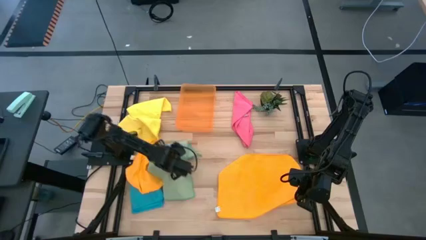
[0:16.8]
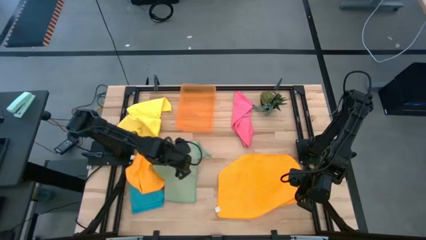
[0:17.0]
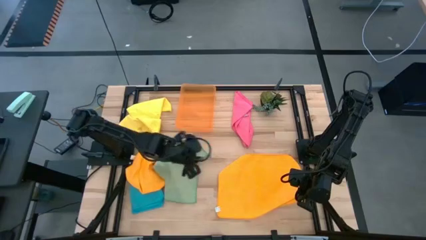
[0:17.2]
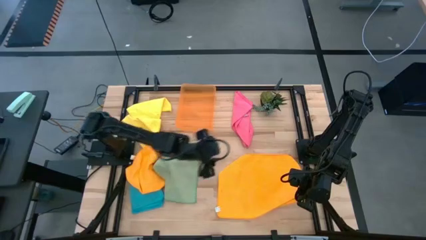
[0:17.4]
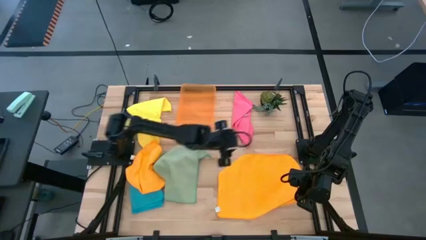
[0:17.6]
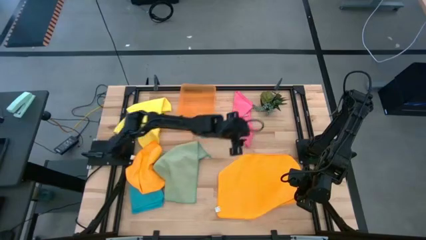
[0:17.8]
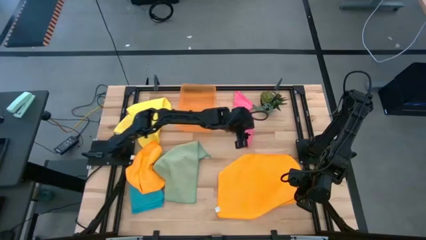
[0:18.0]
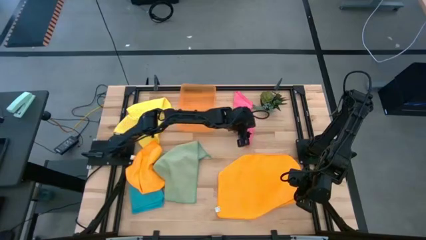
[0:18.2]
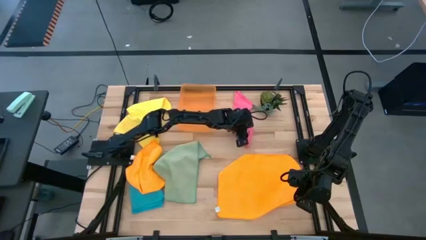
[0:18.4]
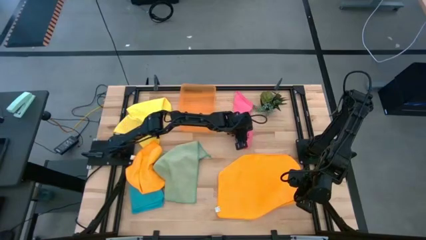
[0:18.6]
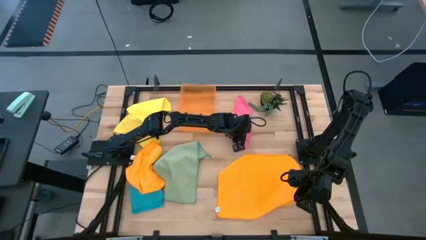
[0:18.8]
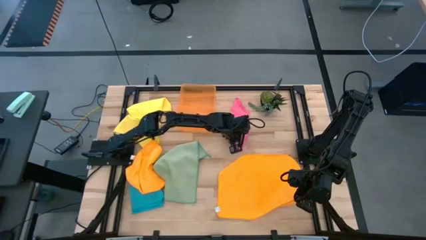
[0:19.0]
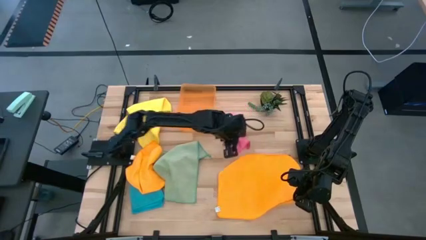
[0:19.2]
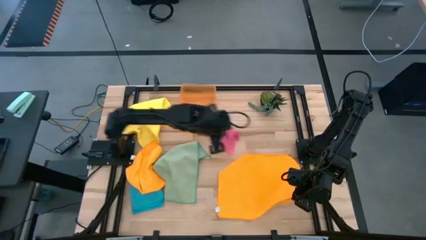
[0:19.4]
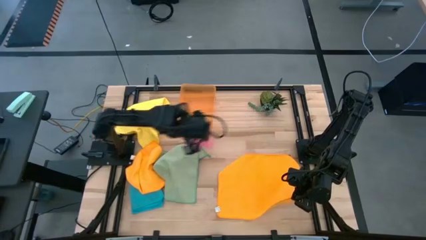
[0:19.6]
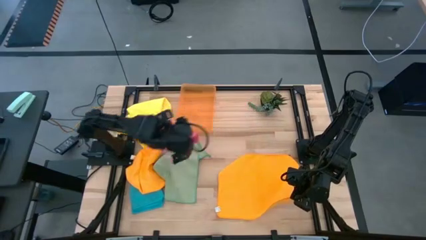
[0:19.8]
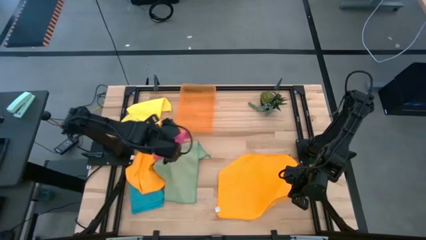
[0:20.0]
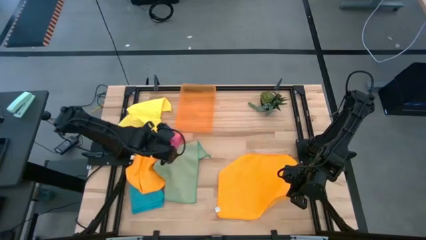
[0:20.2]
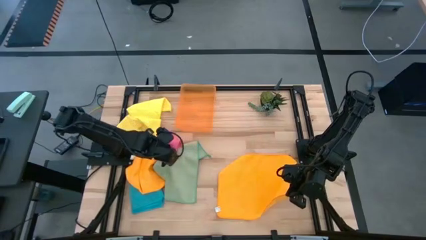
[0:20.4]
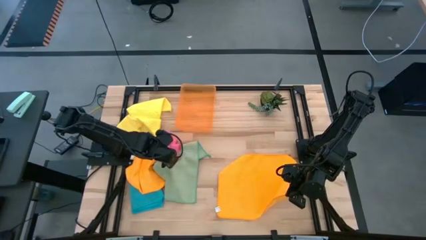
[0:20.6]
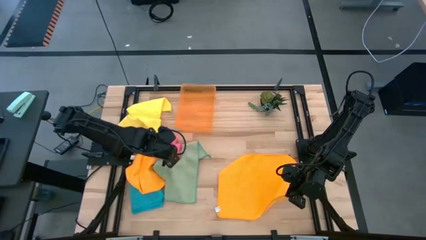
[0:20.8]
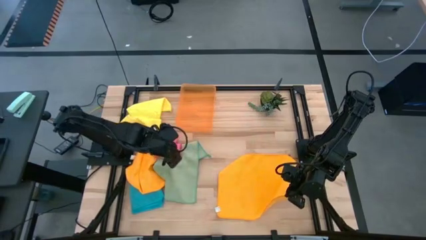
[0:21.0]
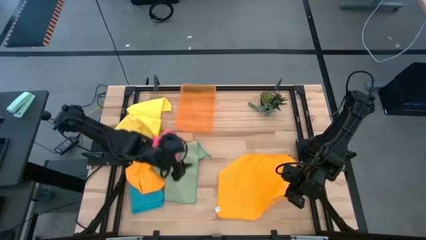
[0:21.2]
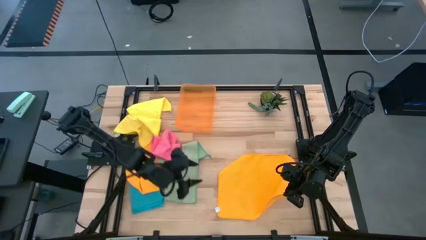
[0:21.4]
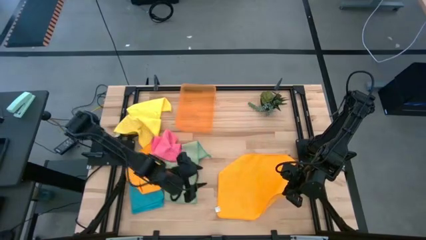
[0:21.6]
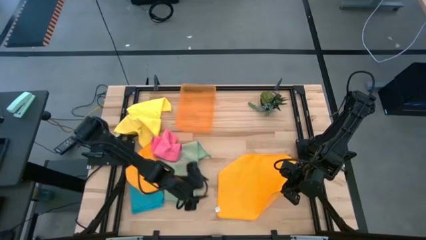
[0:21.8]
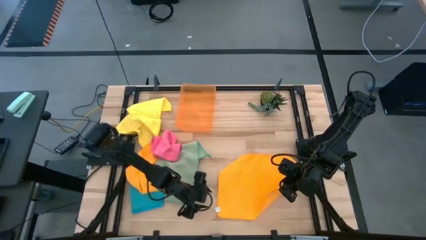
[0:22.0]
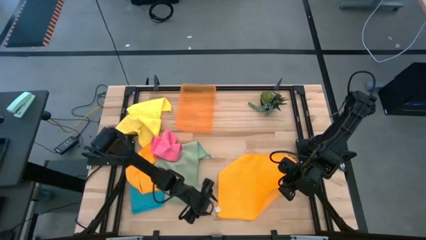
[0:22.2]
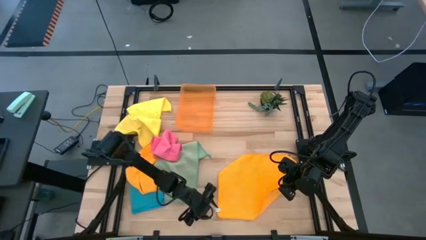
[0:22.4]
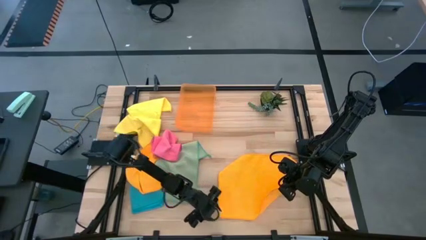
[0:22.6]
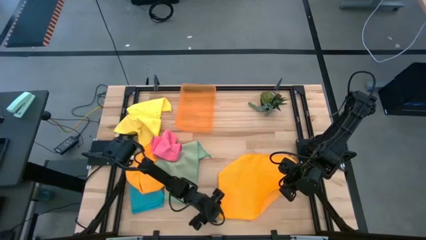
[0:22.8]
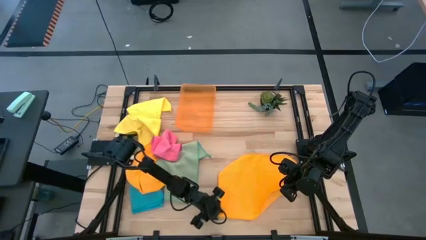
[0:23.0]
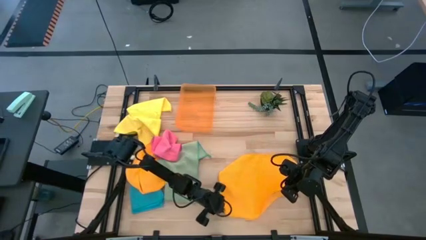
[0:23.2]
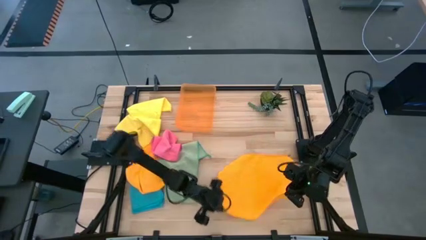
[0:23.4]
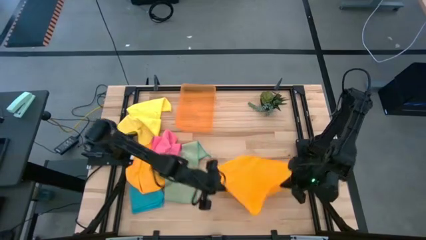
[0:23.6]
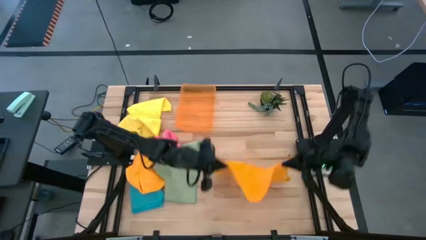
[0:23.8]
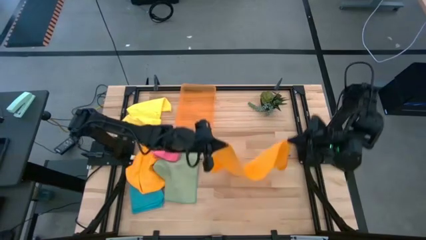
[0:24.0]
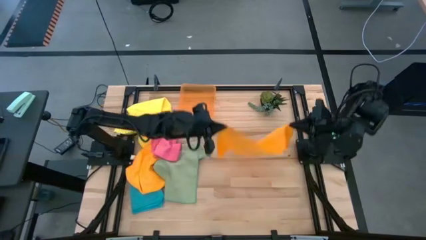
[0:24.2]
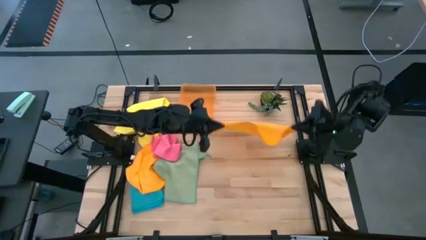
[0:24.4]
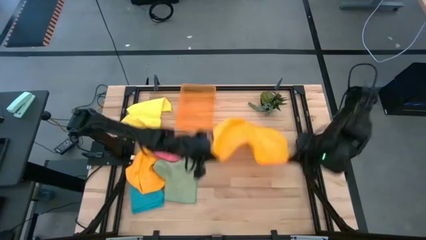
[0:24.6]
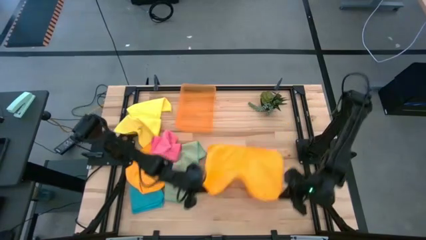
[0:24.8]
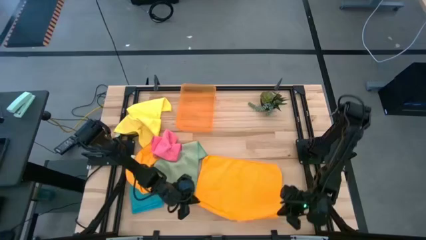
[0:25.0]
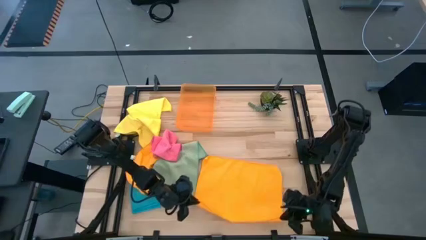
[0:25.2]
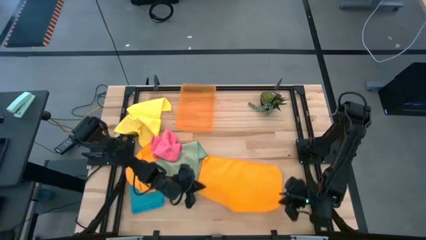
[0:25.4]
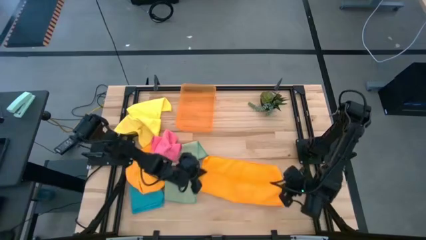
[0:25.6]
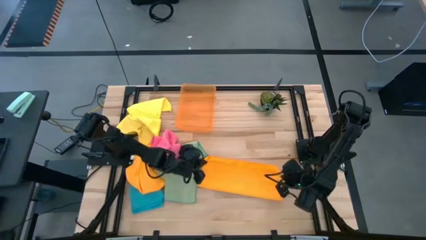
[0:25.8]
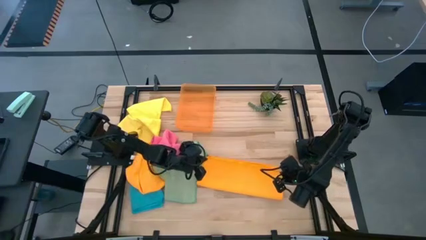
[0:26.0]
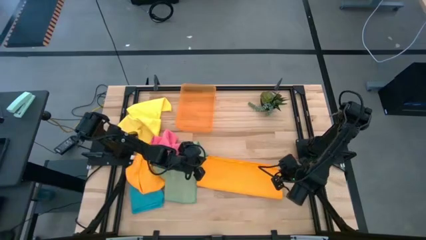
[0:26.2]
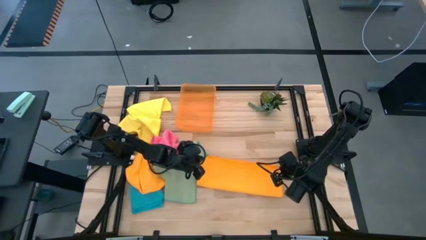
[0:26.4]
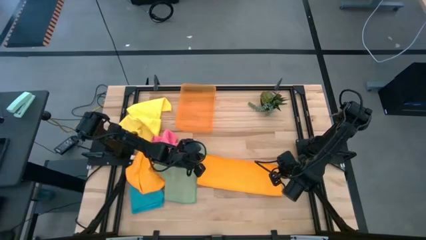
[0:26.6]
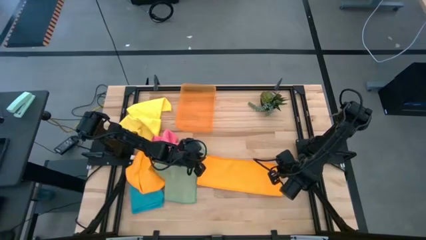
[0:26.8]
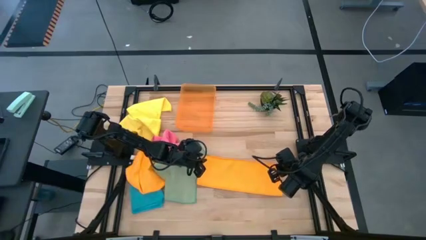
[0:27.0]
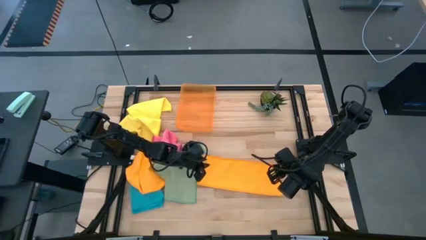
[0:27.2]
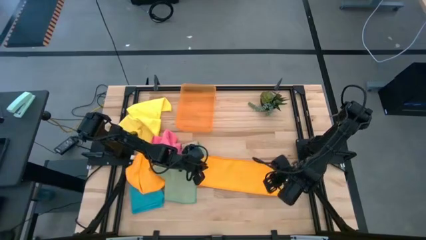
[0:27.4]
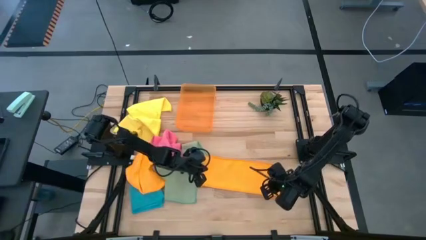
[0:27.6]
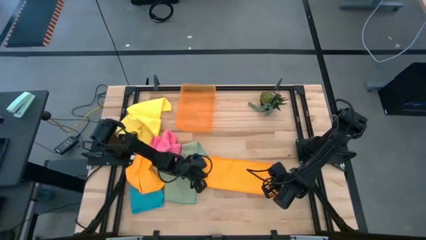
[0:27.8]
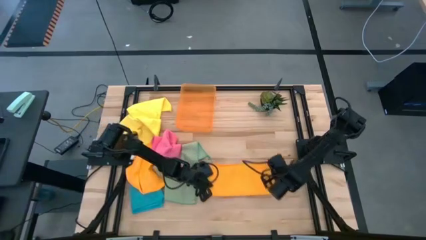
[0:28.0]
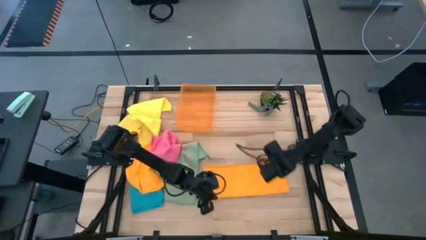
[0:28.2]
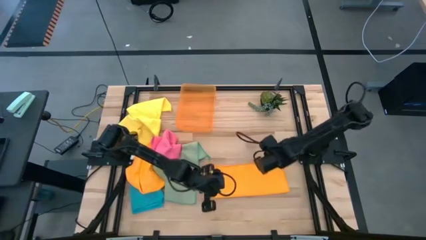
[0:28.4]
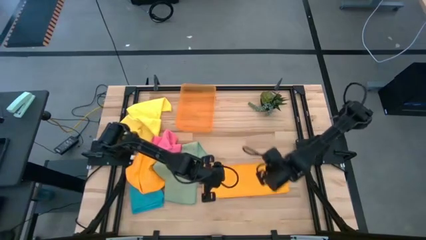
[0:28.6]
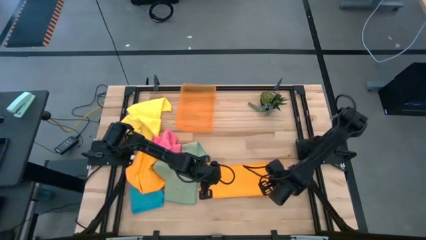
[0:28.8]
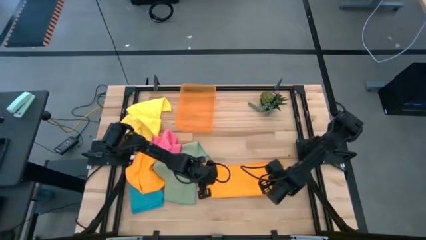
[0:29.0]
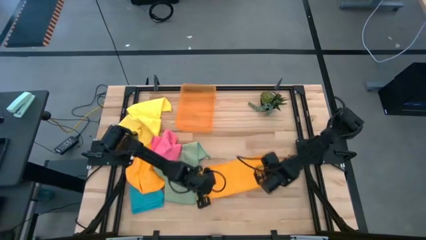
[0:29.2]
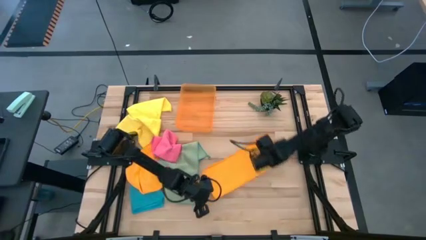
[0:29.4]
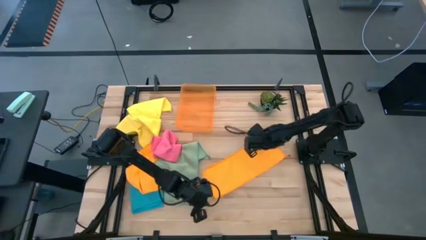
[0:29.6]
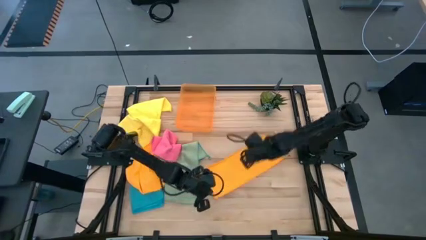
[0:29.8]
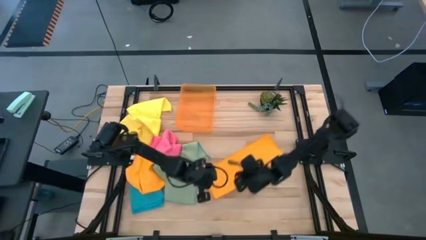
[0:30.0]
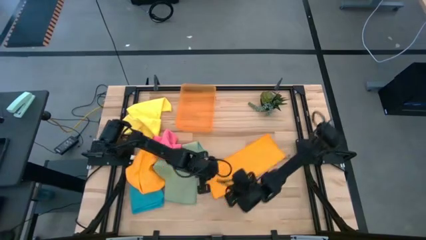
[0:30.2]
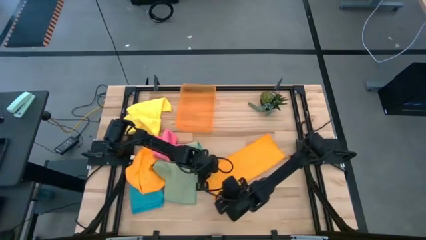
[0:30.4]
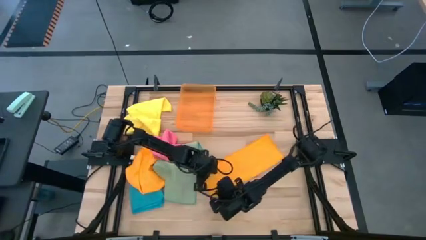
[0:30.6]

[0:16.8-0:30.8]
Task: Fold microfiber towels
Fold the right orange microfiber cloth
